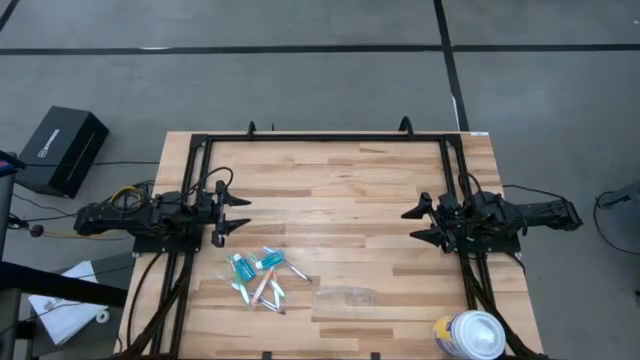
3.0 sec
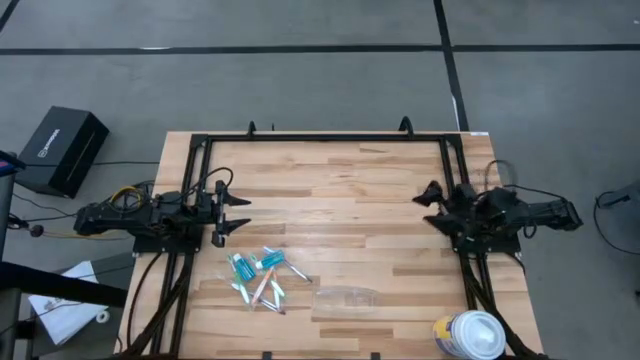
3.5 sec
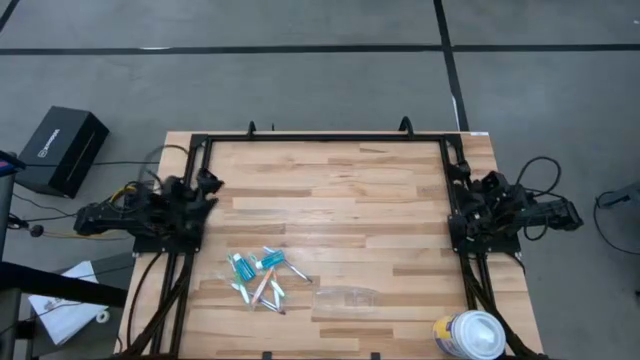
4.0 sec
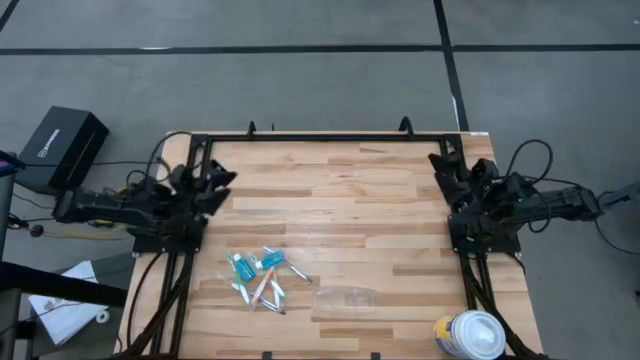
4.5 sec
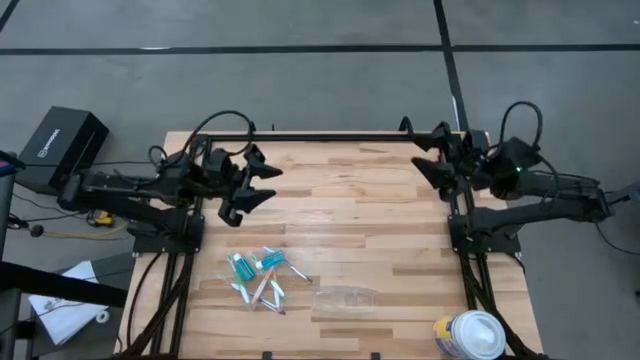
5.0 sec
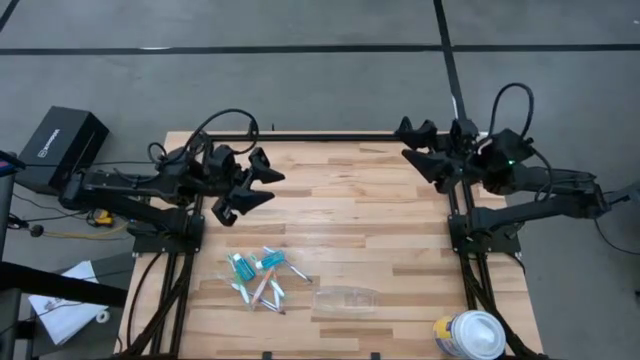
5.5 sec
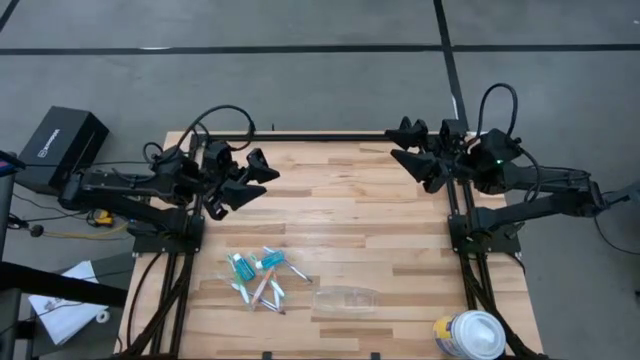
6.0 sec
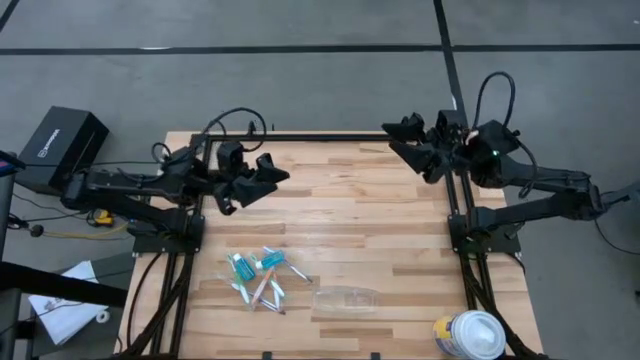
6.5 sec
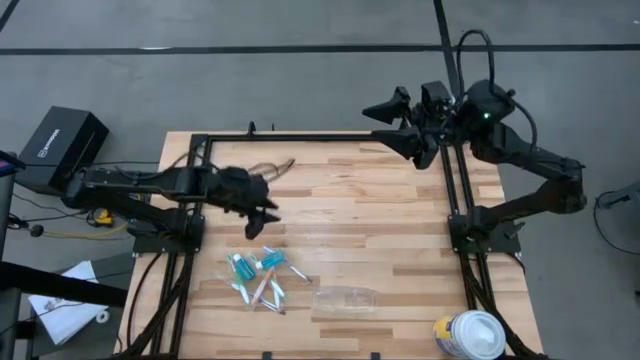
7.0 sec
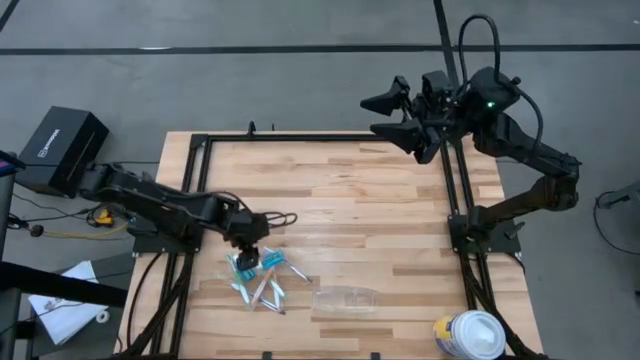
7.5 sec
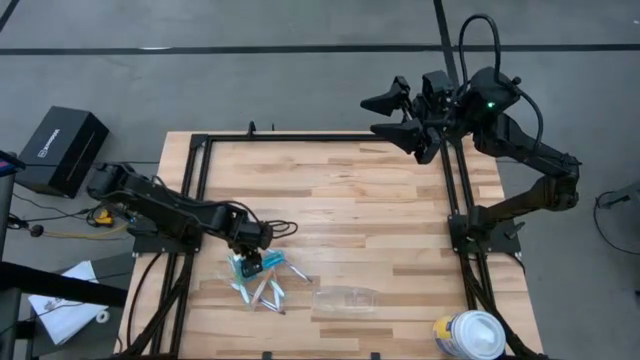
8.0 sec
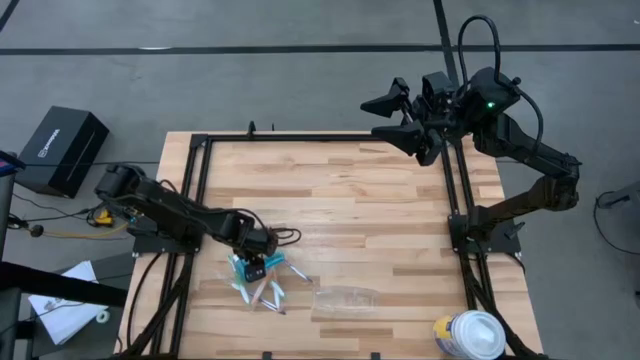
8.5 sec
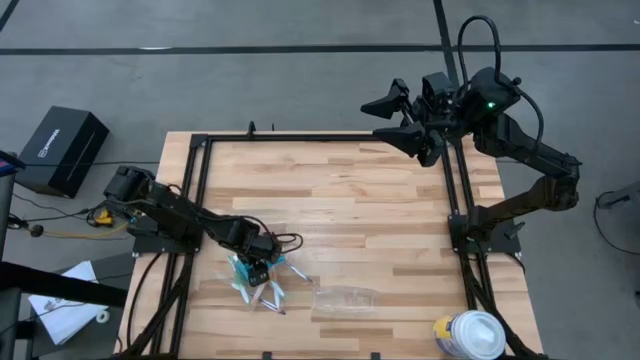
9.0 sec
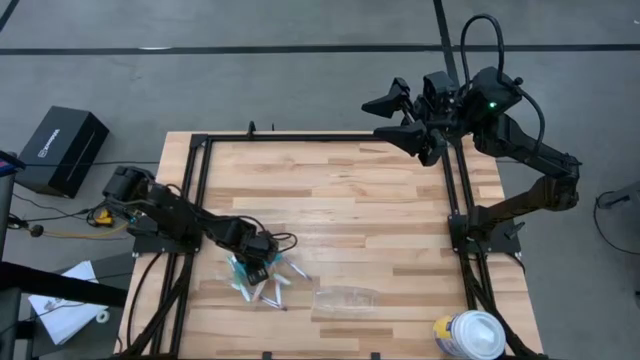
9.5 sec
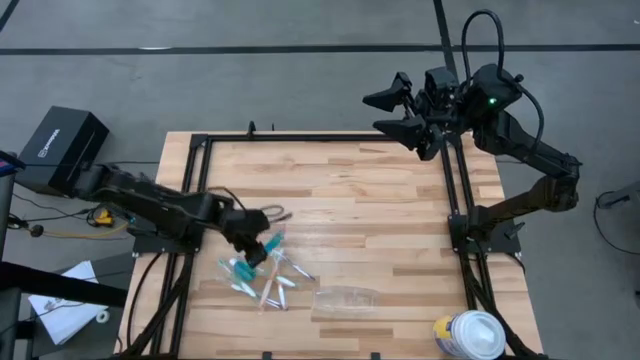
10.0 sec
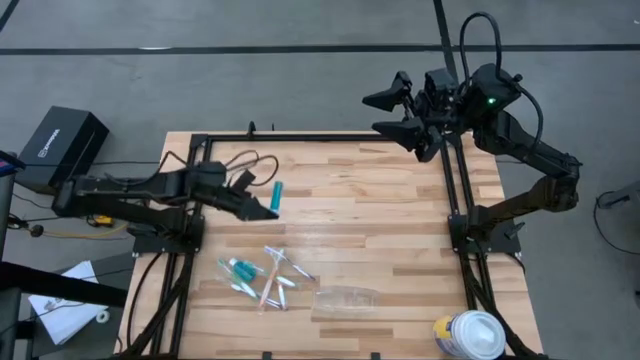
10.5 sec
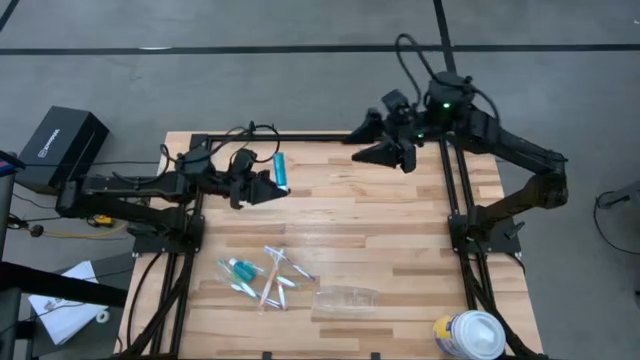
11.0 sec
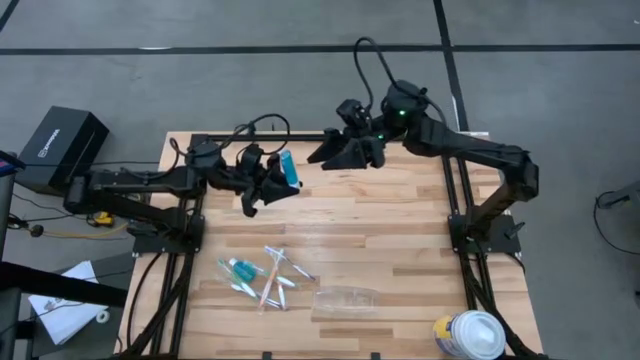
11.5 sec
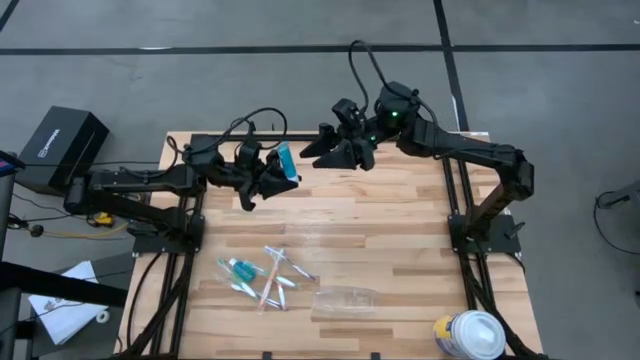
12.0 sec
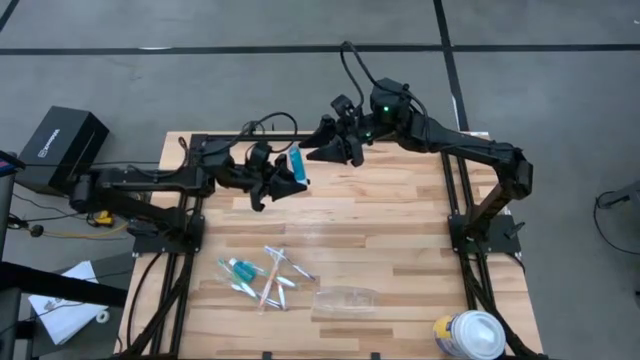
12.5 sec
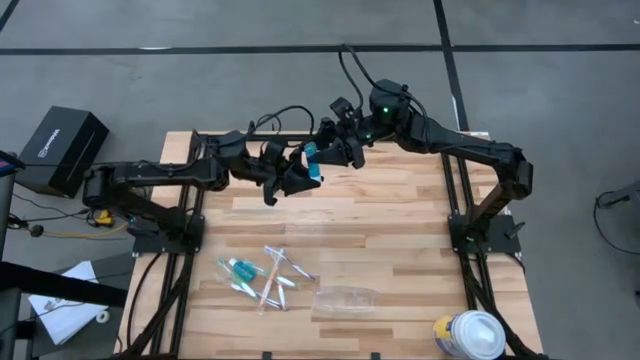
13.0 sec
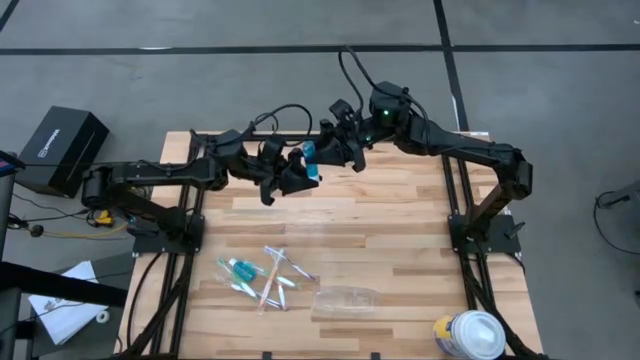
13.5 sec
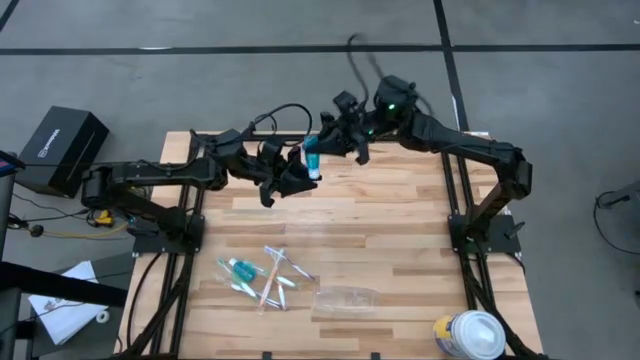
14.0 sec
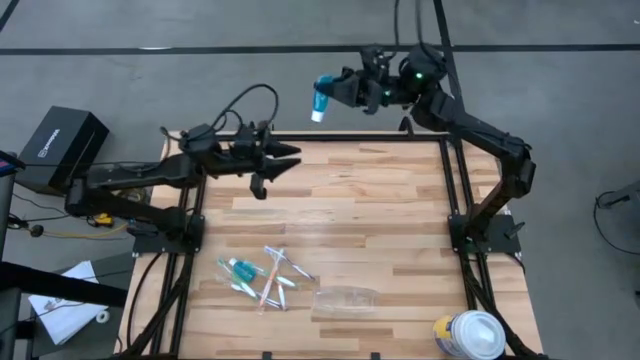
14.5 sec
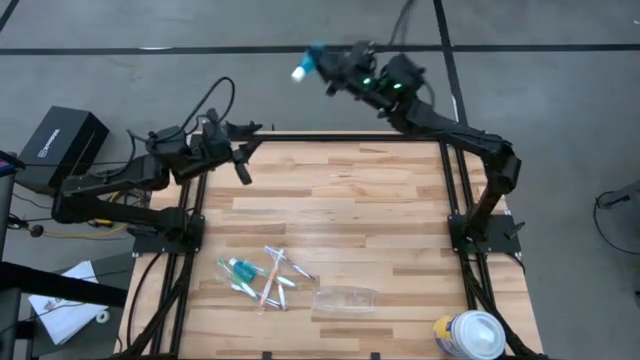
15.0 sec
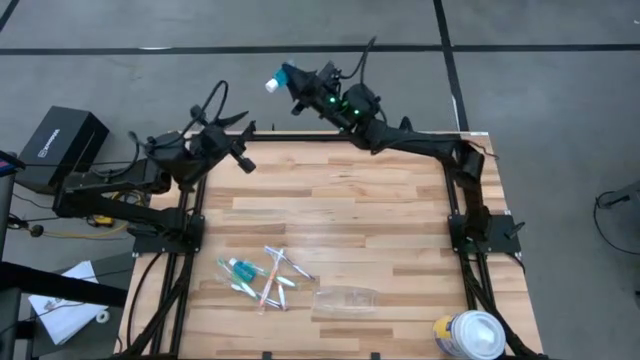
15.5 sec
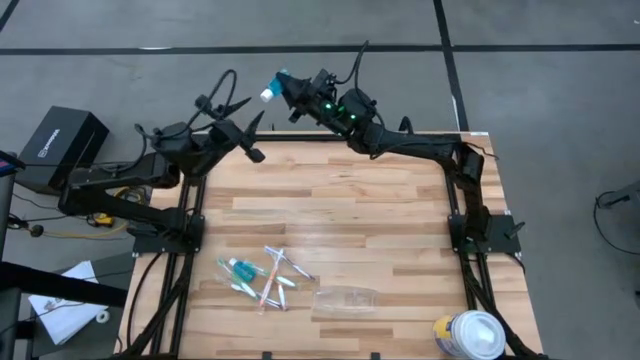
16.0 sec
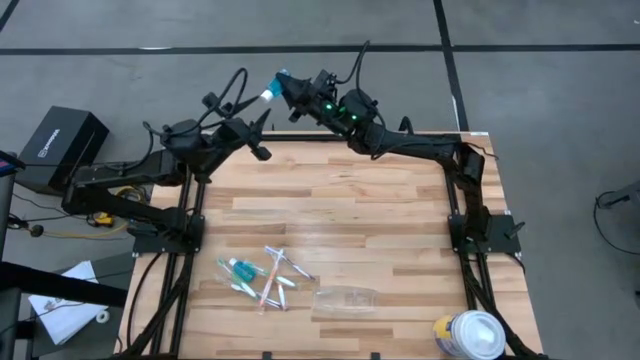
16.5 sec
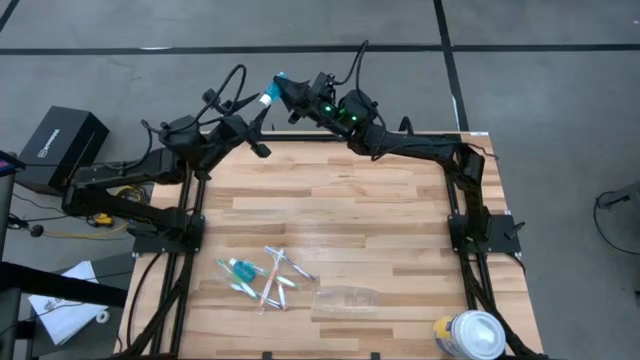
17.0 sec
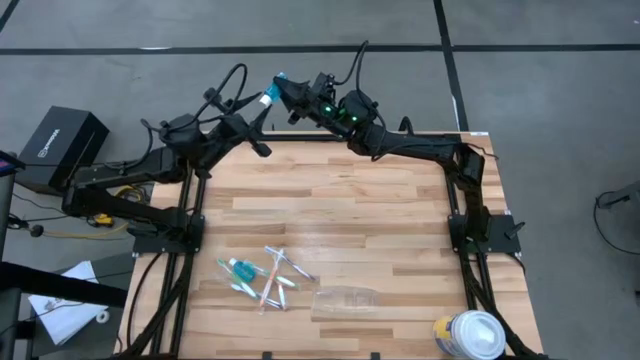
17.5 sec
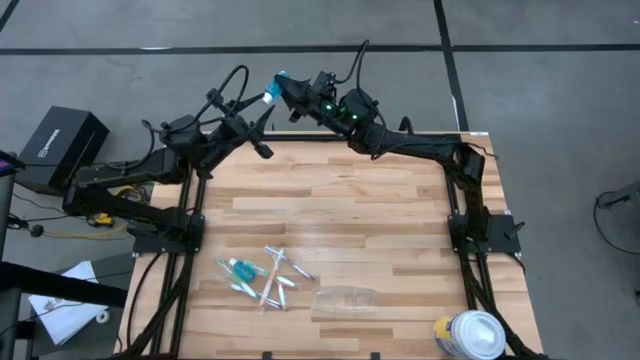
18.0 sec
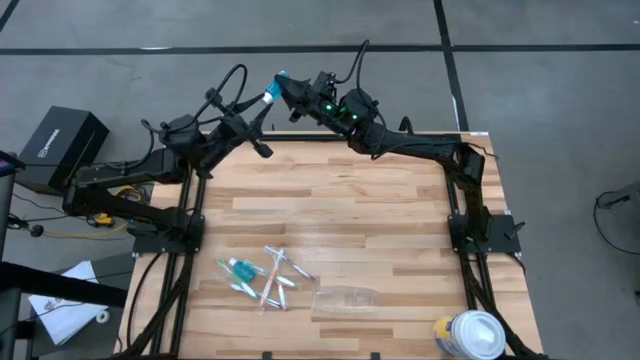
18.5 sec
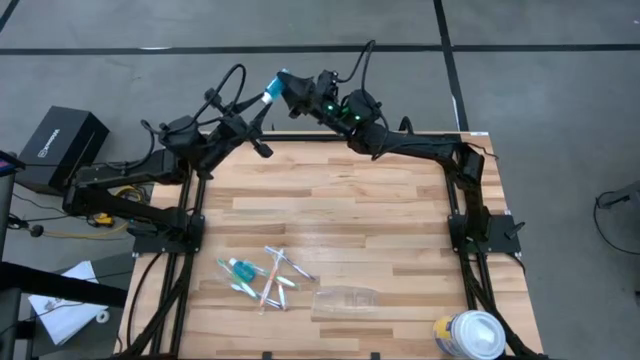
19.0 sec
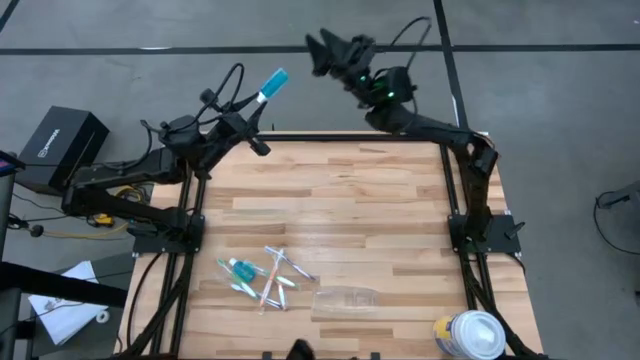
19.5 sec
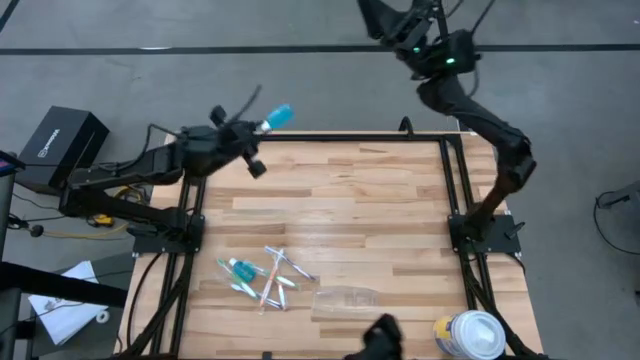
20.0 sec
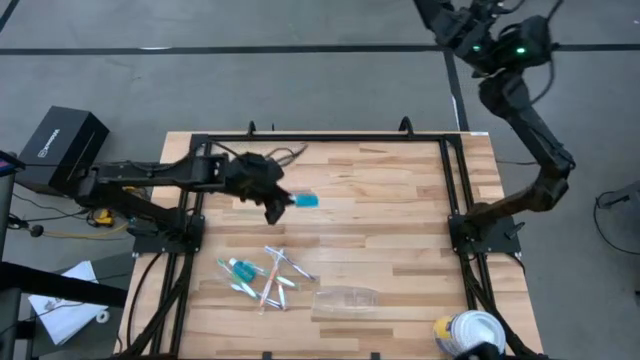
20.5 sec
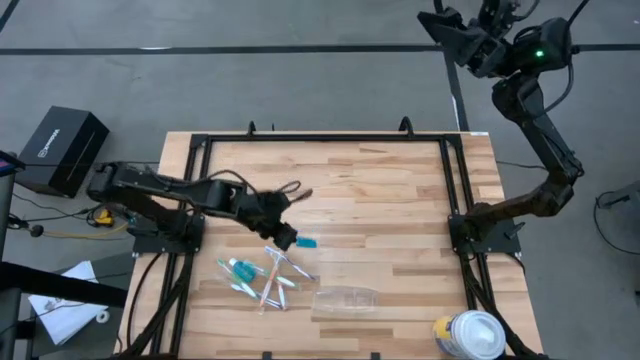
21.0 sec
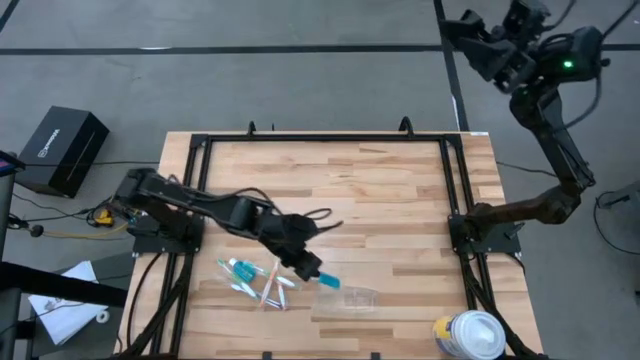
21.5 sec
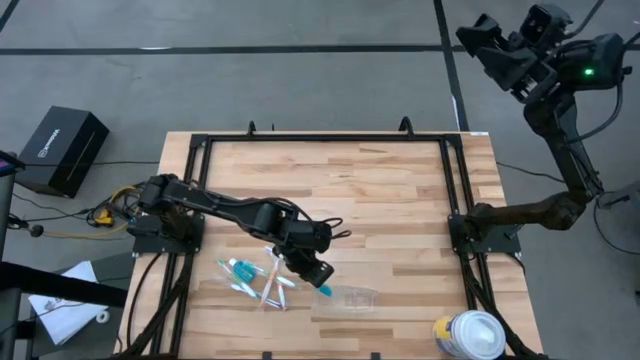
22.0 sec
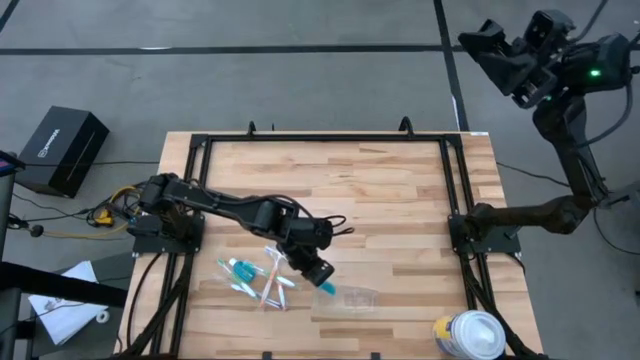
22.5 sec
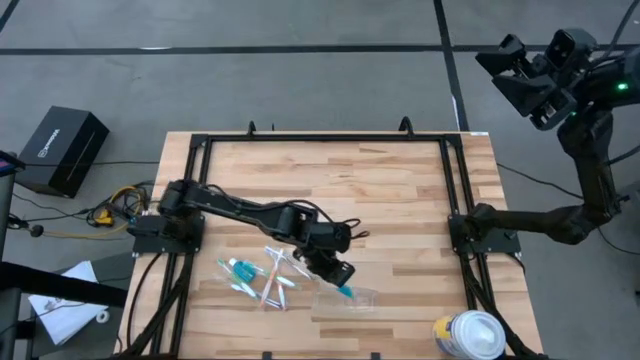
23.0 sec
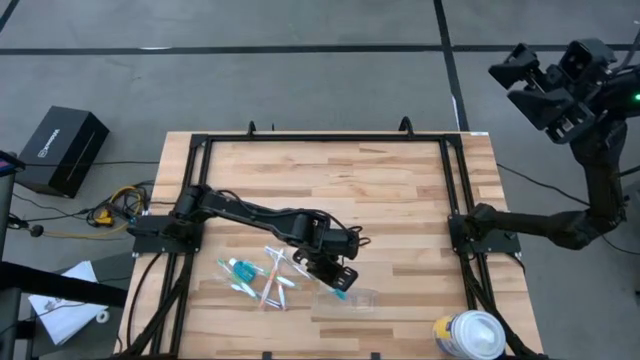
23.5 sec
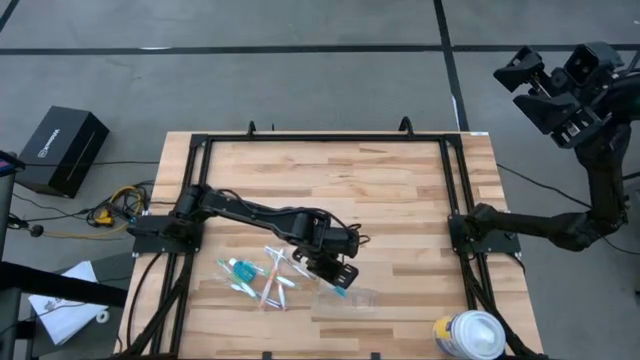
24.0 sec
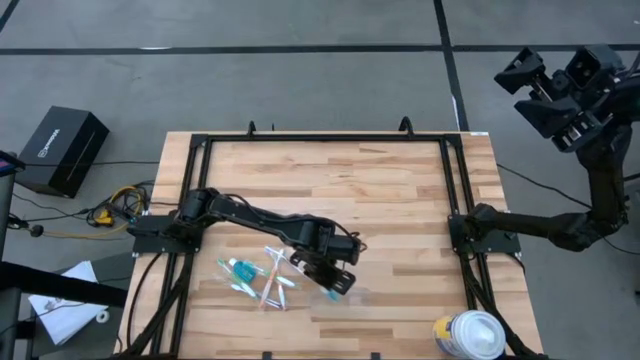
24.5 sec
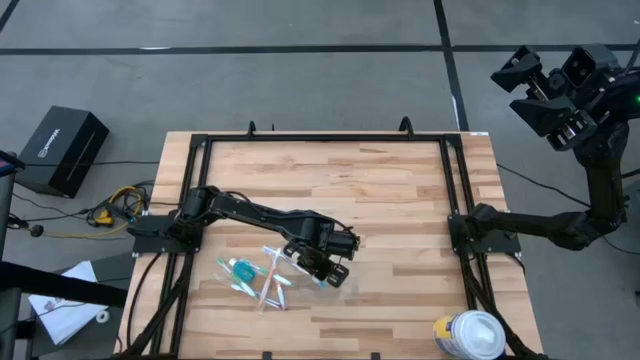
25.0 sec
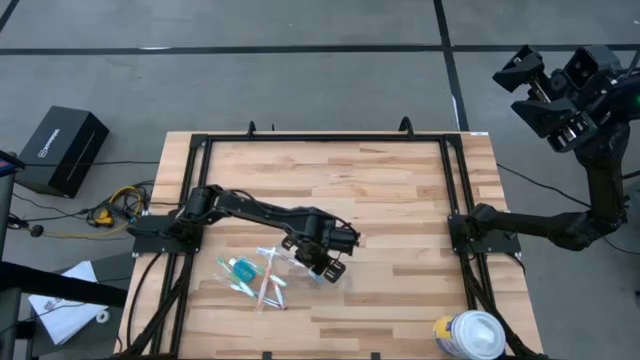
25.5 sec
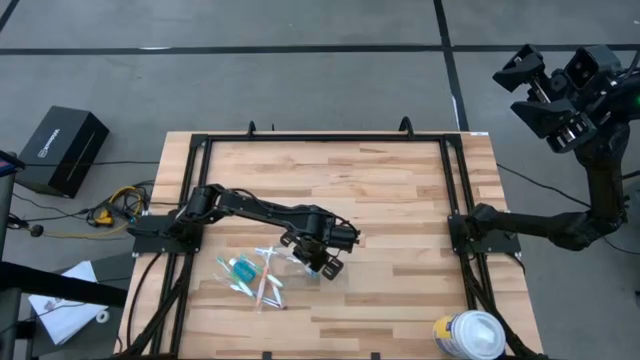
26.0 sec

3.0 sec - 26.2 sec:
Task: Pick & Place toothbrushing station
Put the blue mouthwash into the transparent organizer
